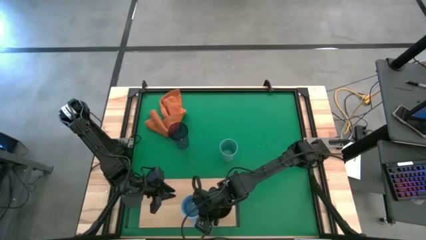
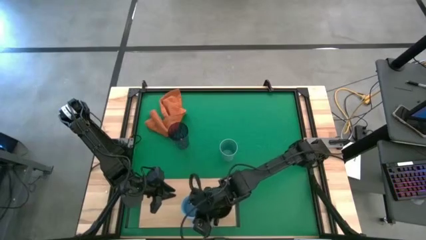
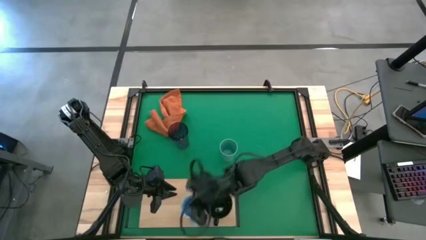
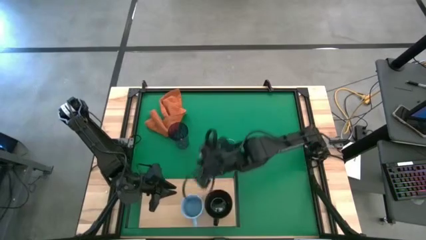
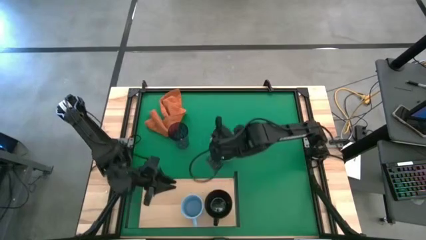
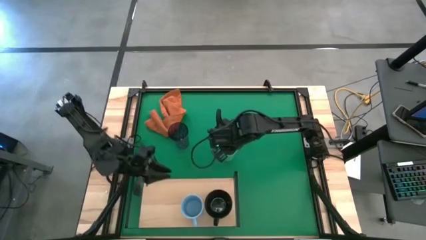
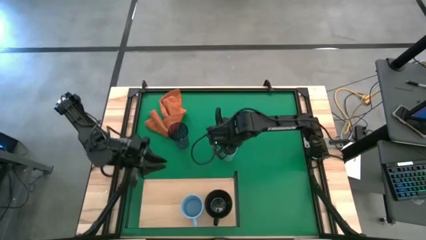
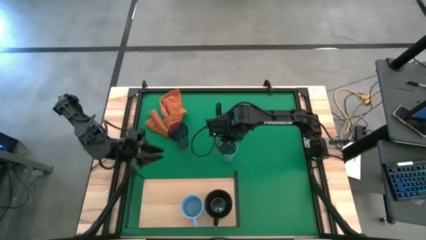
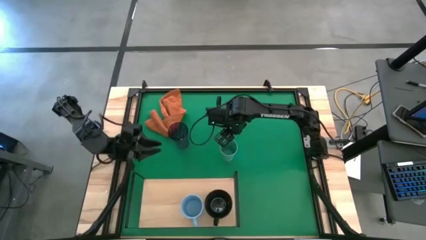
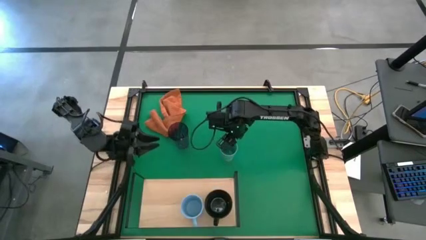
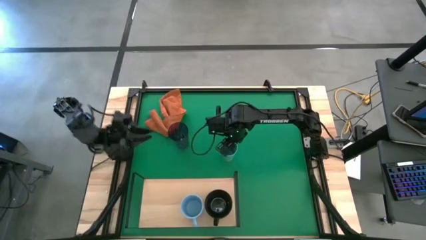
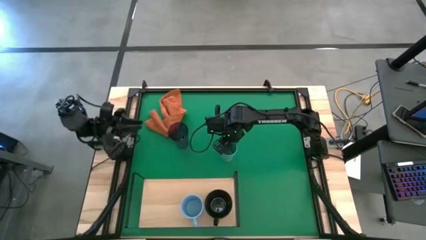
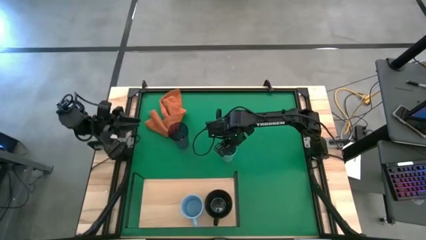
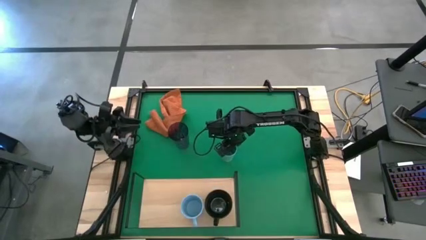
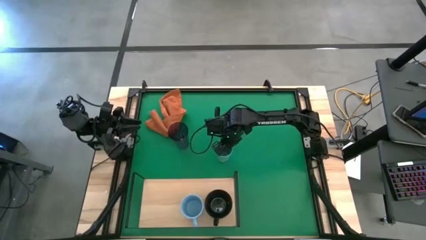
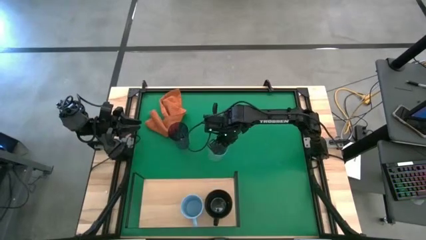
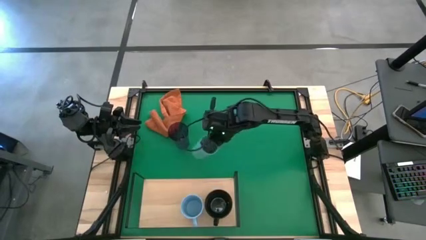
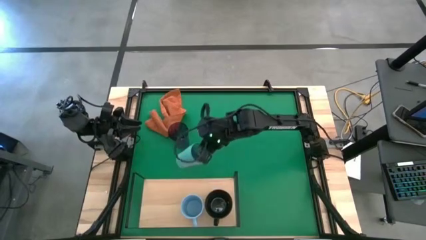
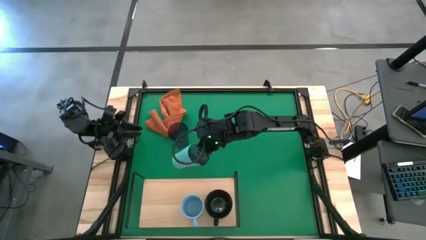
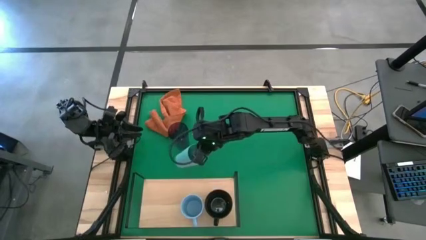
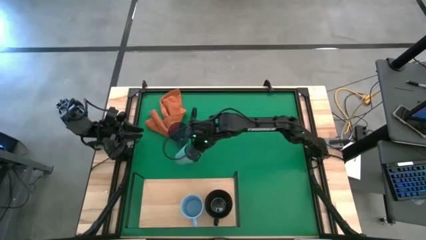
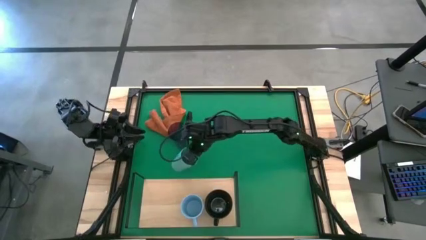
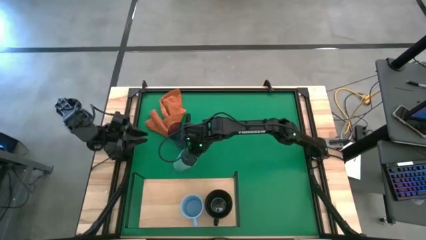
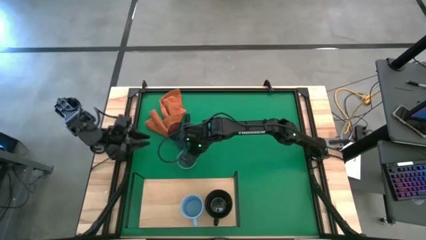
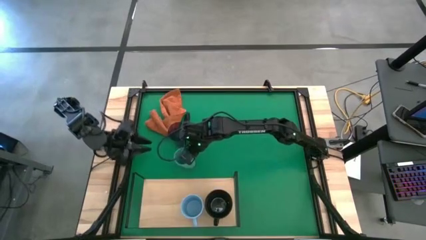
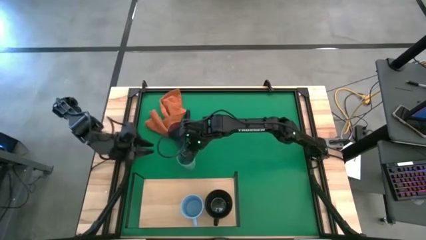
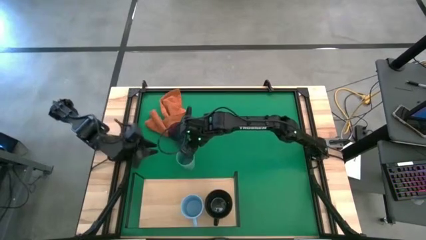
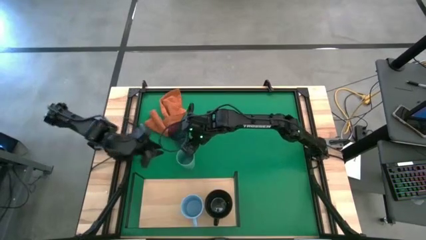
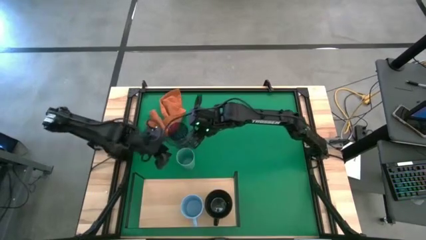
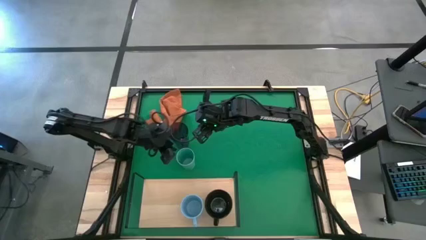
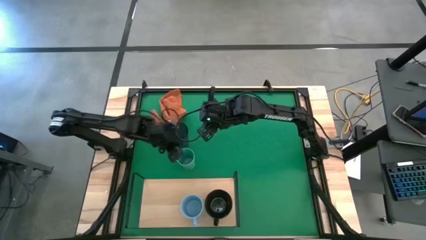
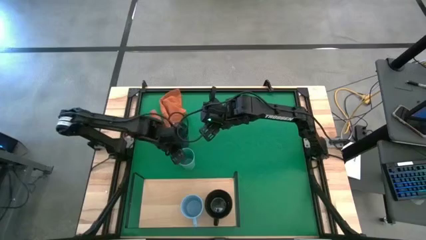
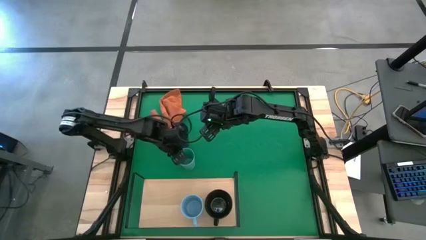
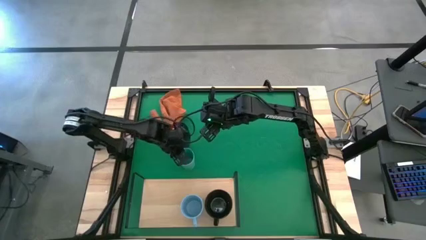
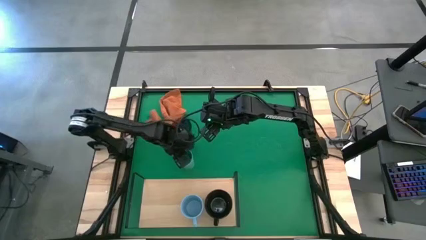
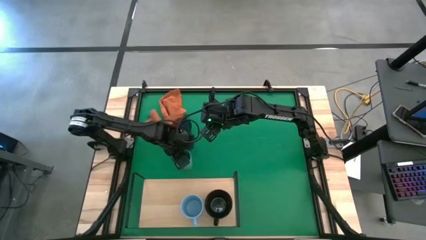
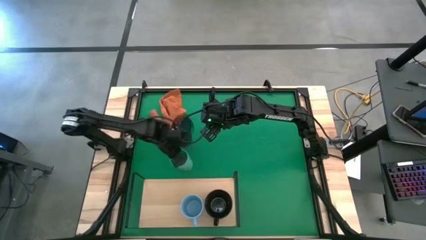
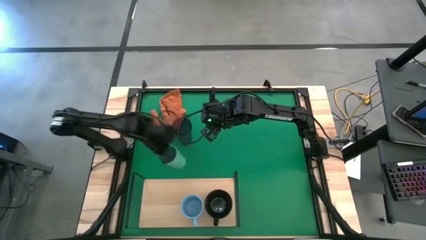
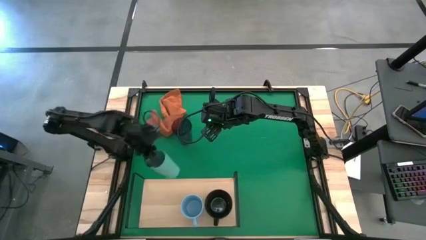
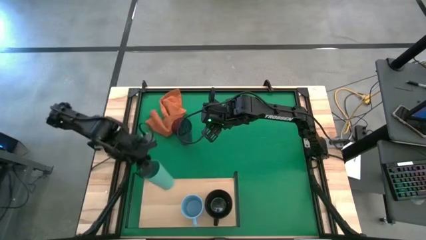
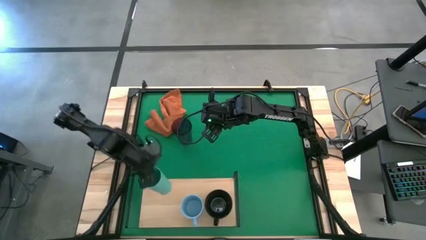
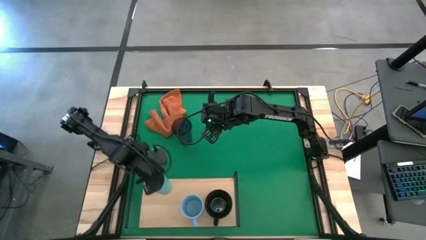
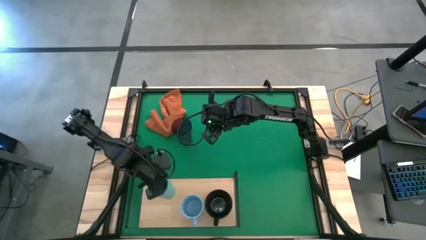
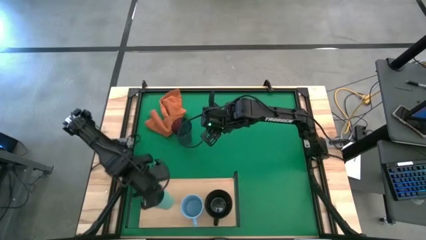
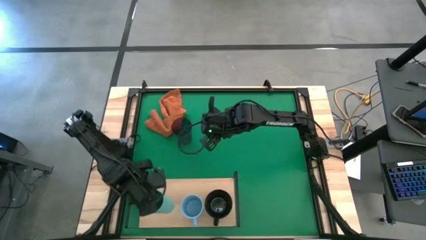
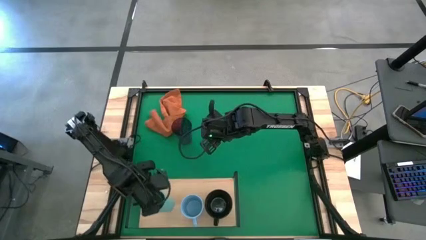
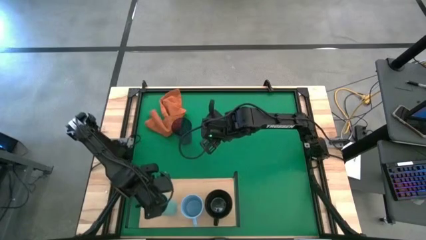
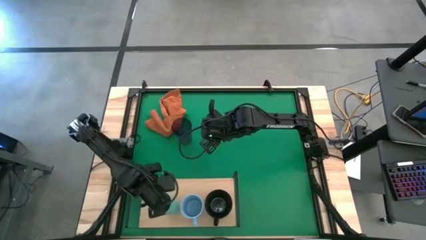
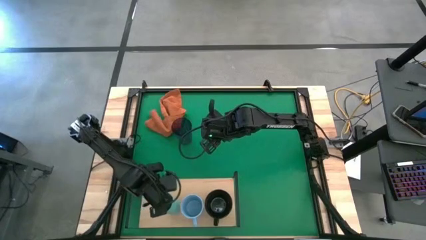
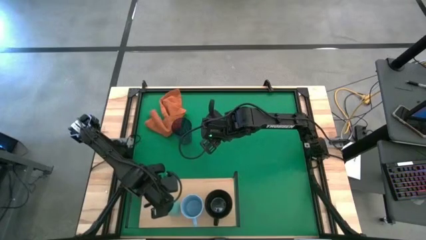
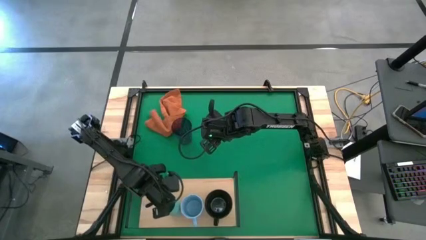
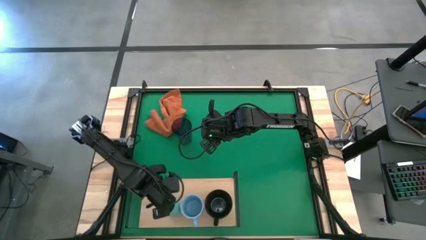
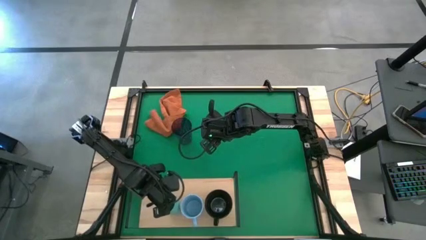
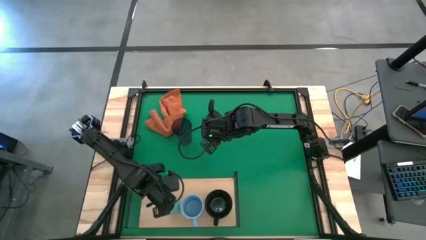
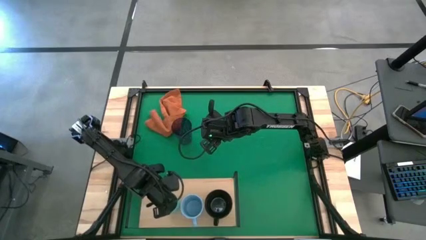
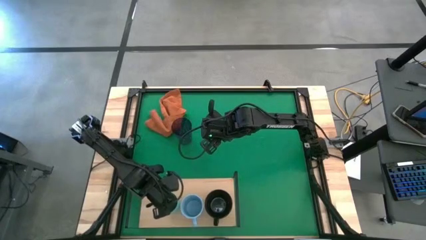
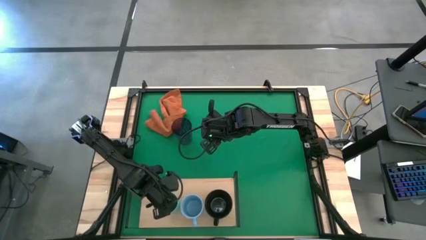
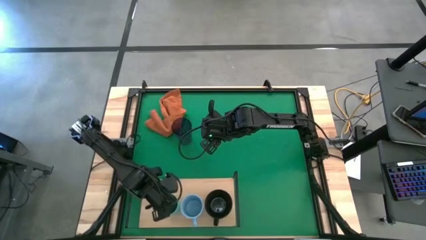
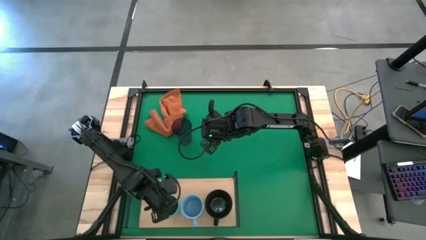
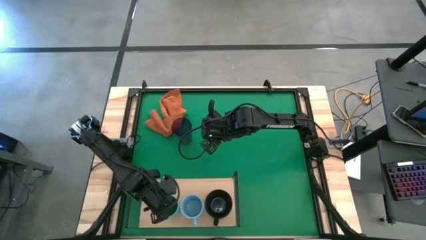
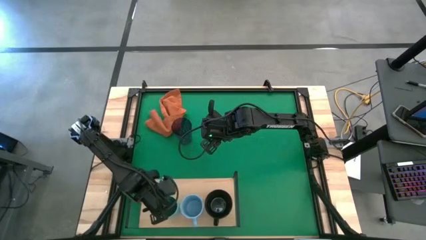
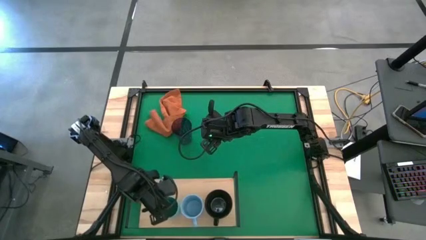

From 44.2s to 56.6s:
Task: Stack small to large cups/mugs on shelf
Put the green cup on the shelf

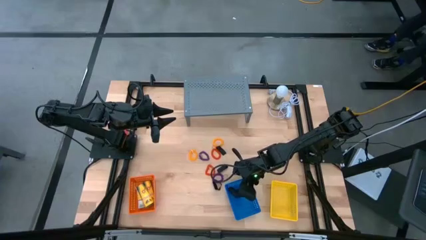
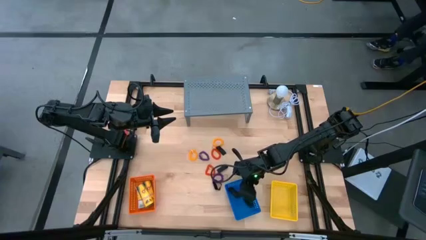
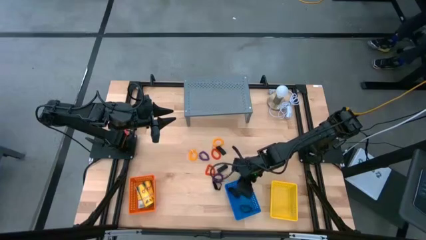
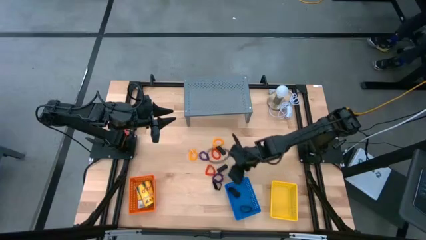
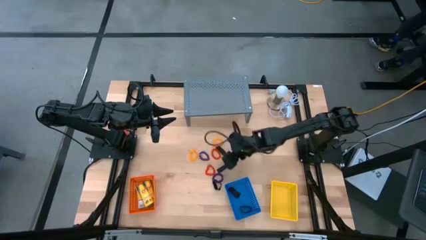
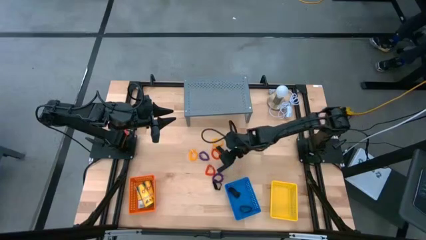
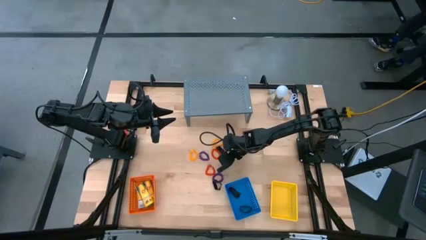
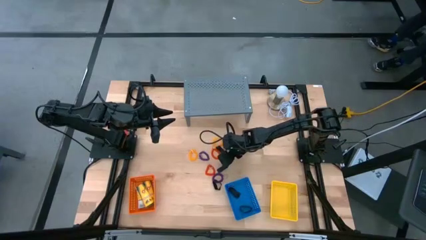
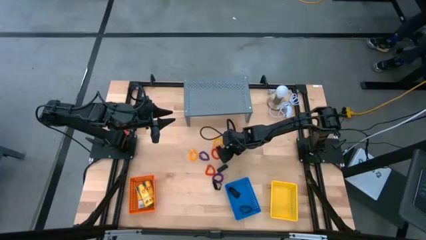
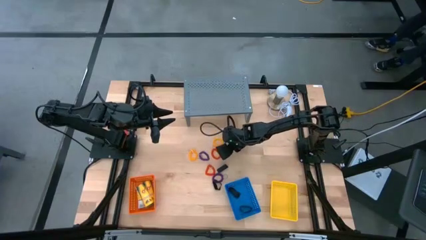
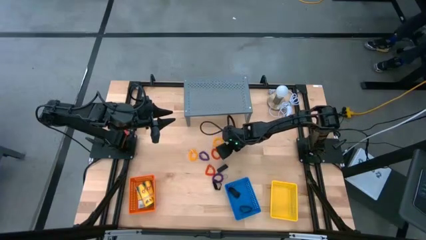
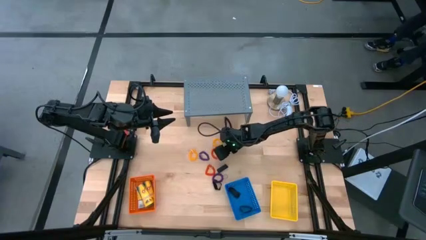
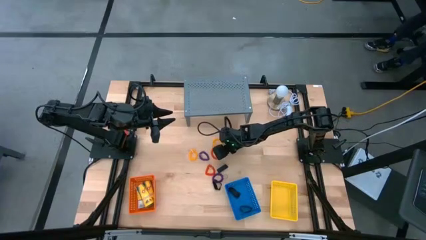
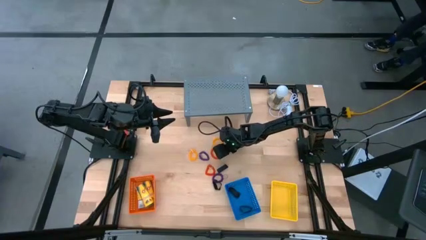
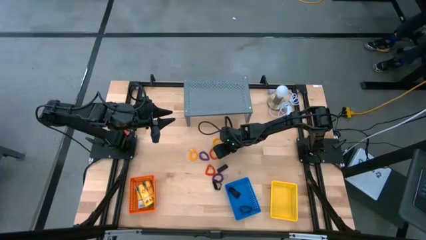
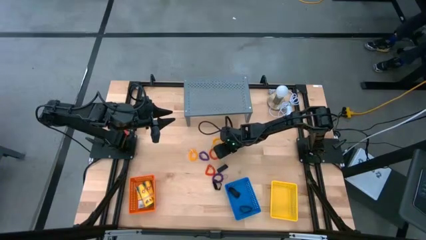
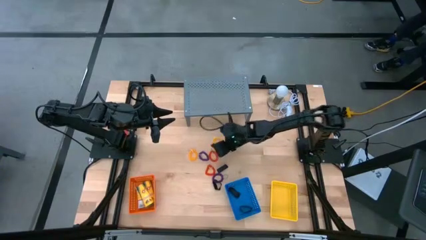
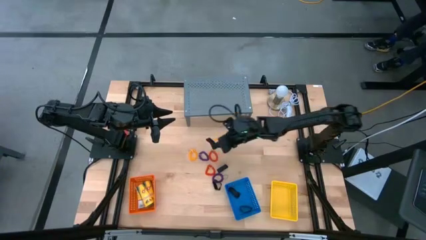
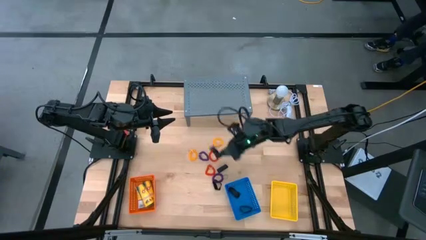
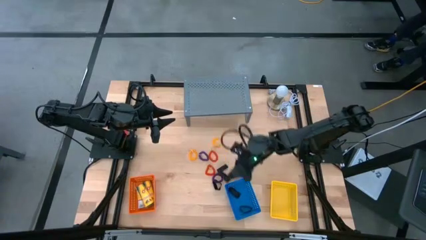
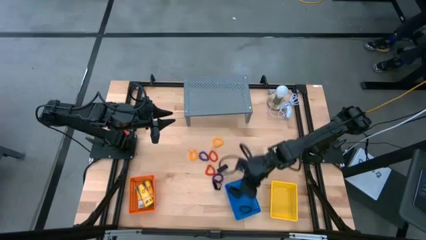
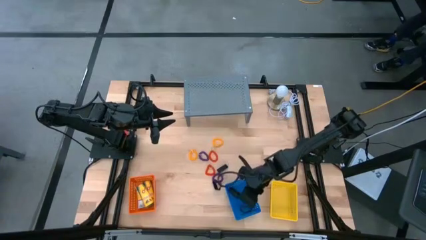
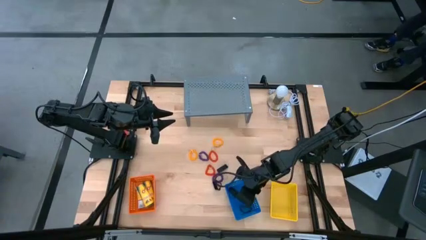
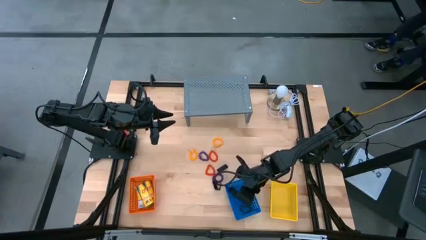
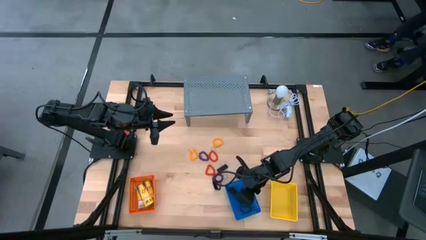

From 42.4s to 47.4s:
Task: Pick & Place Office Desk Supplies
Put the black rubber band into the blue bin
